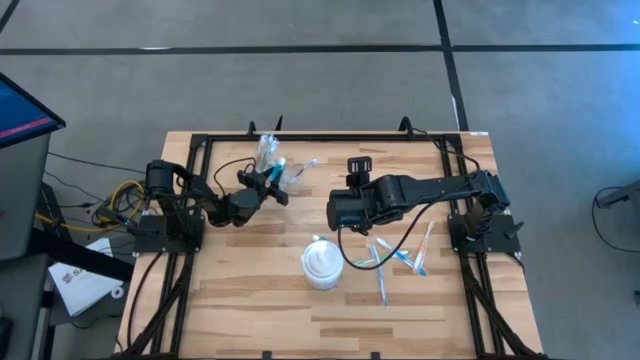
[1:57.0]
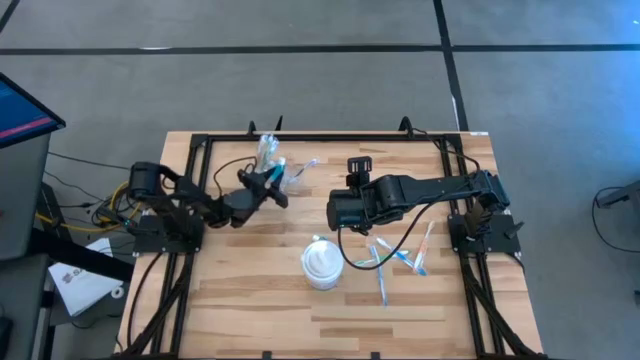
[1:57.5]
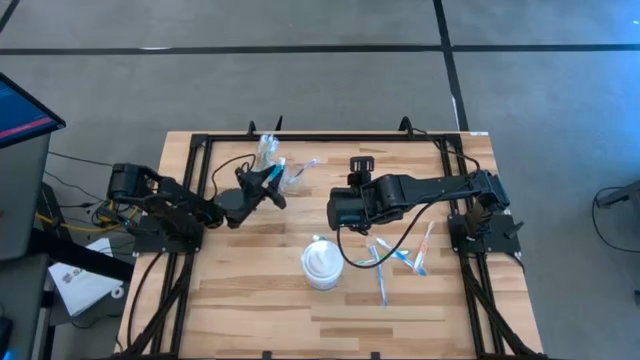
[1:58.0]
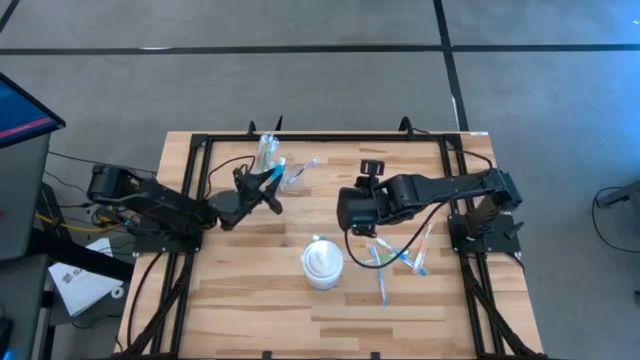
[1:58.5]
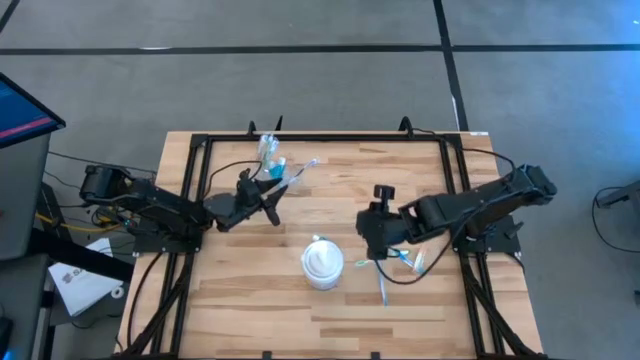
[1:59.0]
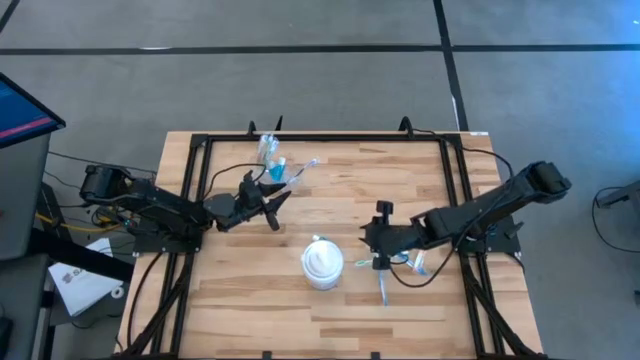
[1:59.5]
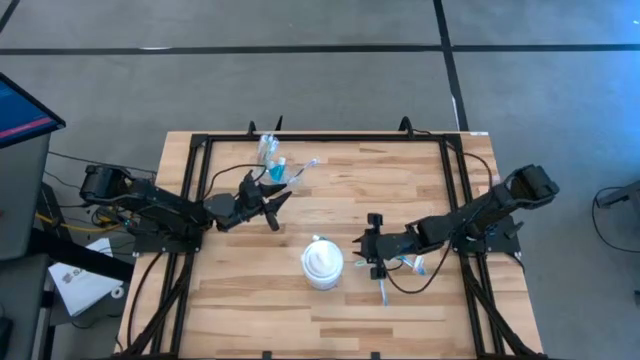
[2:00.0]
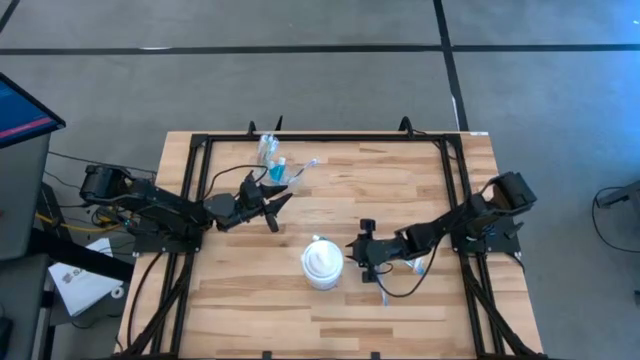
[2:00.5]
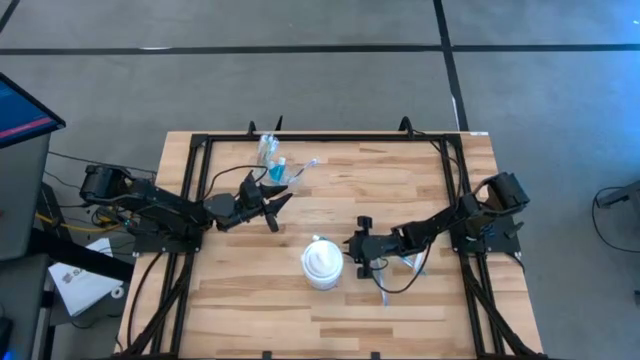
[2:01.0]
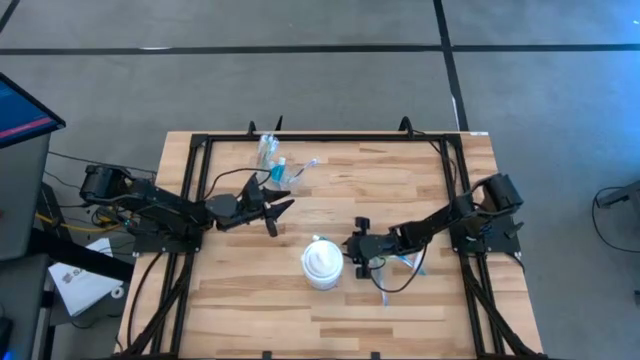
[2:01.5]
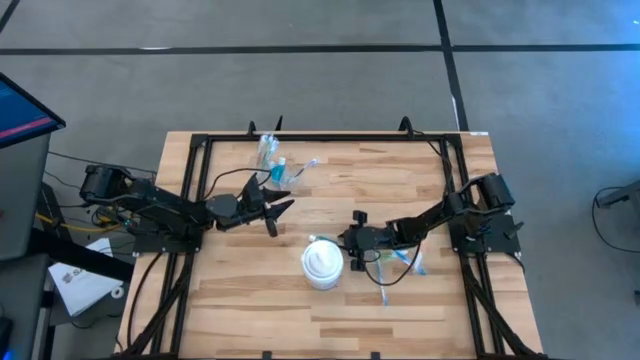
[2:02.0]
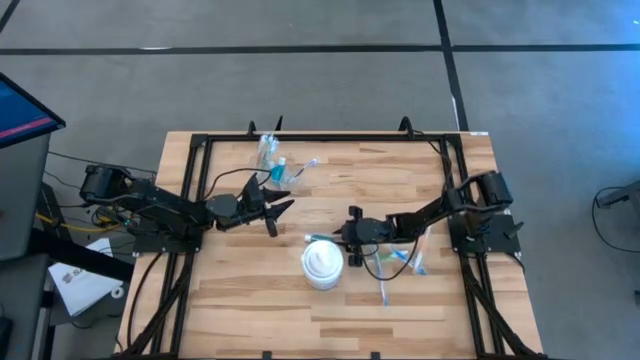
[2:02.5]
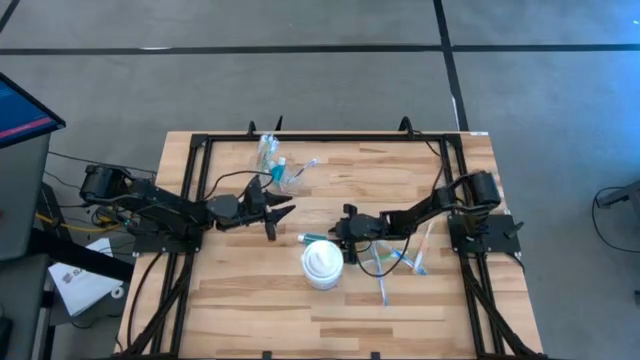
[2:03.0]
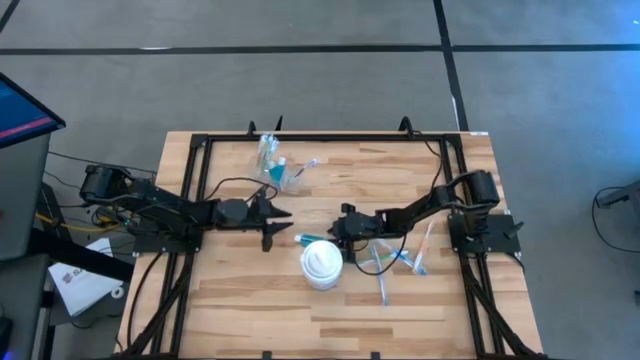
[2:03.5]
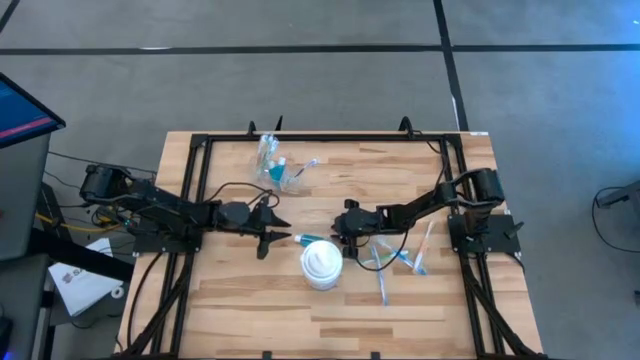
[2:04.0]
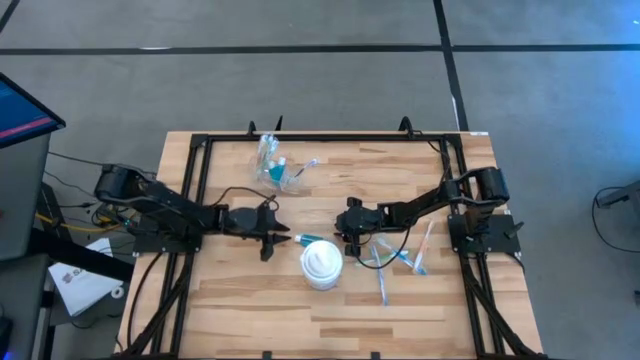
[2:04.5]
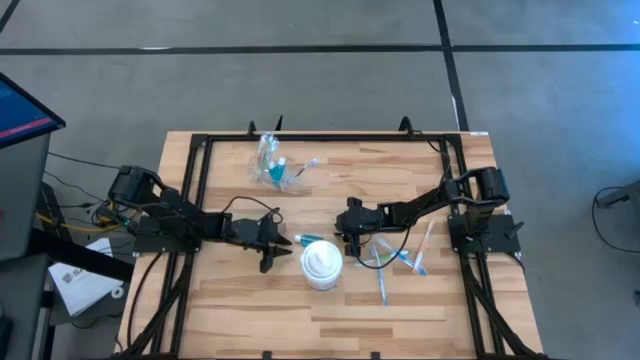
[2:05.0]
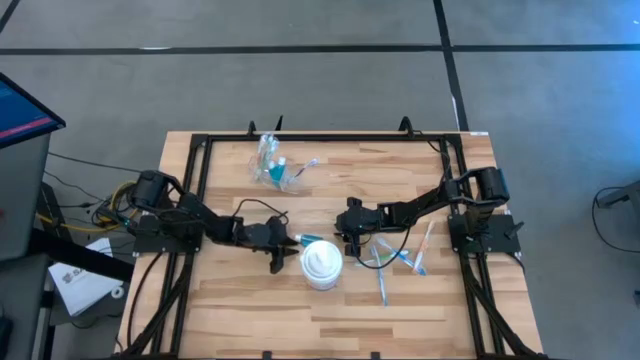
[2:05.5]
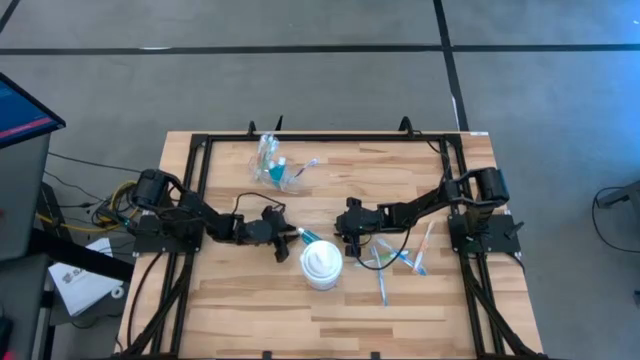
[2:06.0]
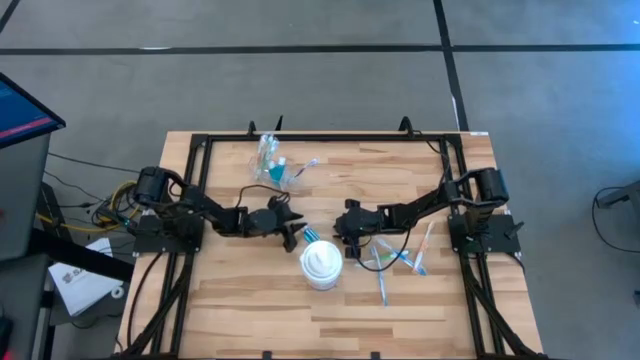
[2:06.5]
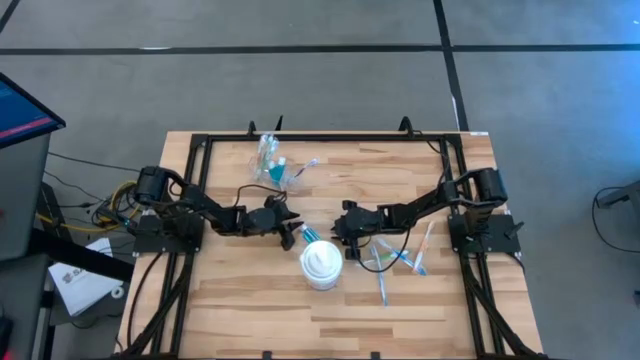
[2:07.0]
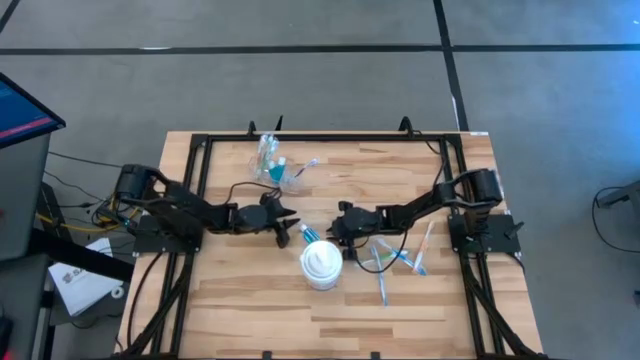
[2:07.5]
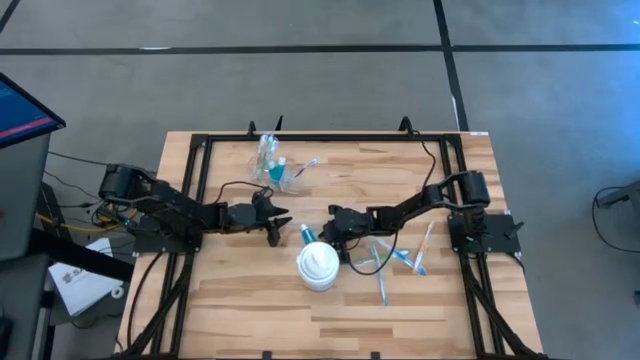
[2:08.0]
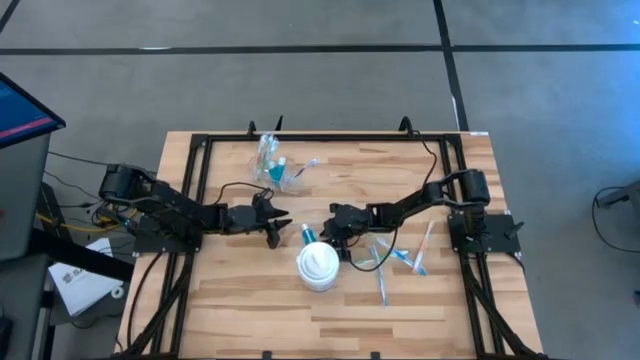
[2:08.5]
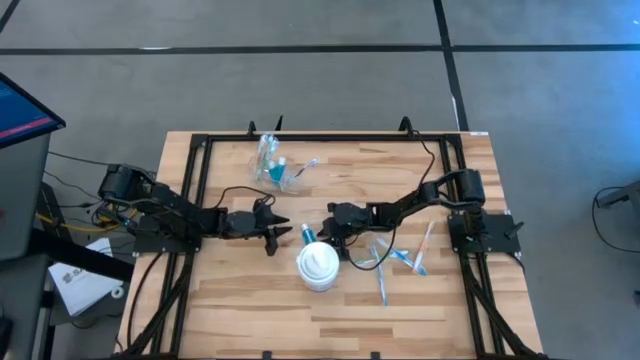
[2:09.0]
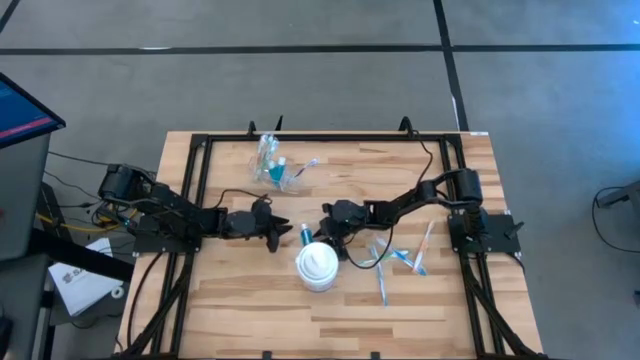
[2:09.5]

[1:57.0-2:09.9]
Task: Pick & Place toothbrushing station
Put the blue mouthwash into the transparent organizer

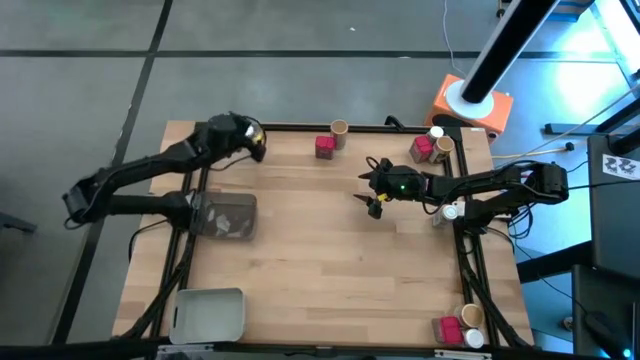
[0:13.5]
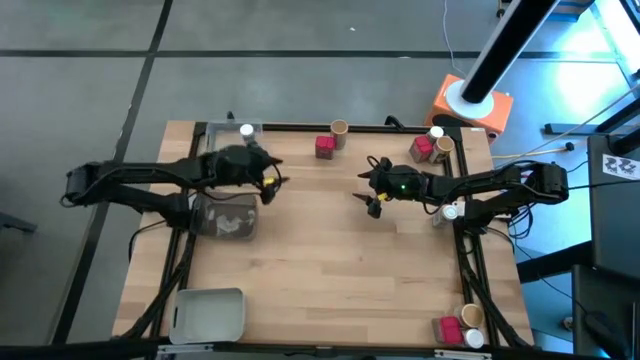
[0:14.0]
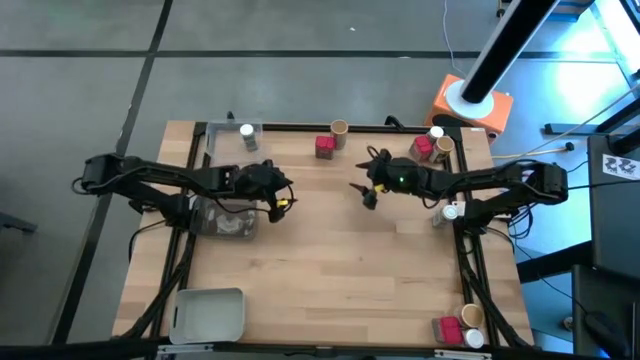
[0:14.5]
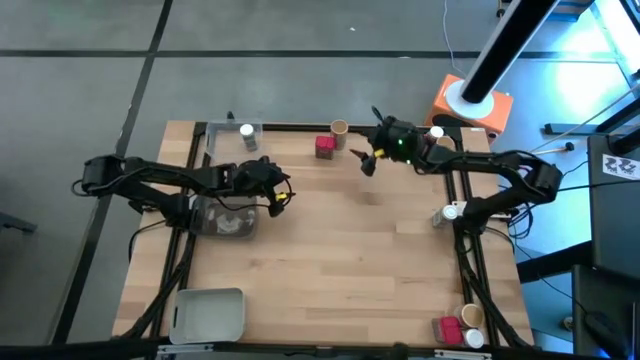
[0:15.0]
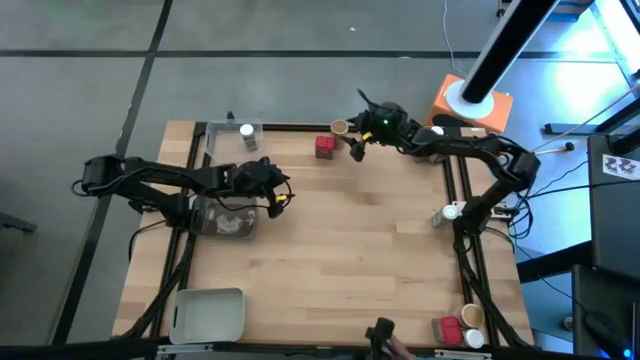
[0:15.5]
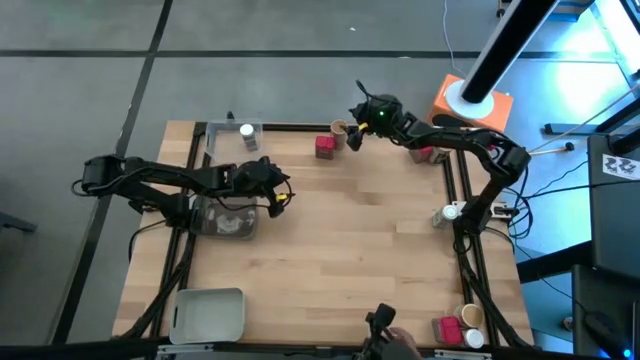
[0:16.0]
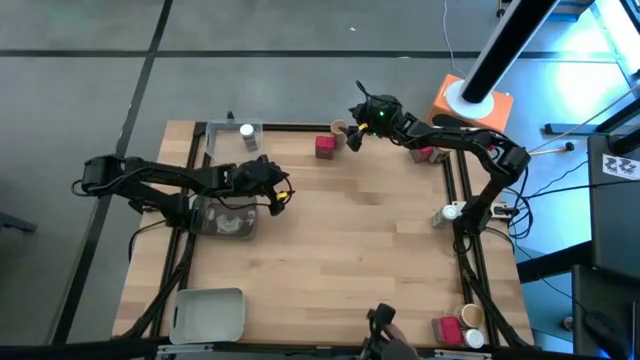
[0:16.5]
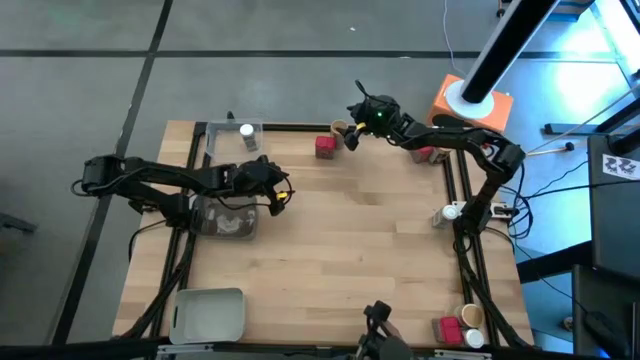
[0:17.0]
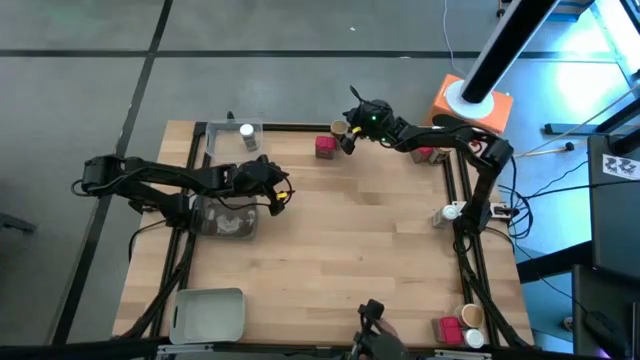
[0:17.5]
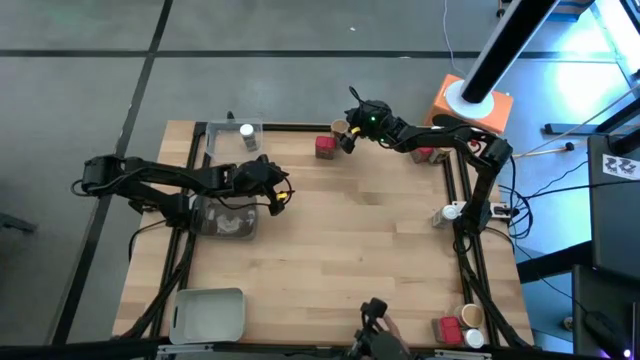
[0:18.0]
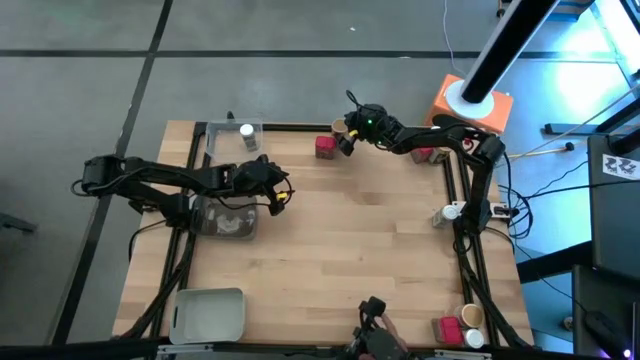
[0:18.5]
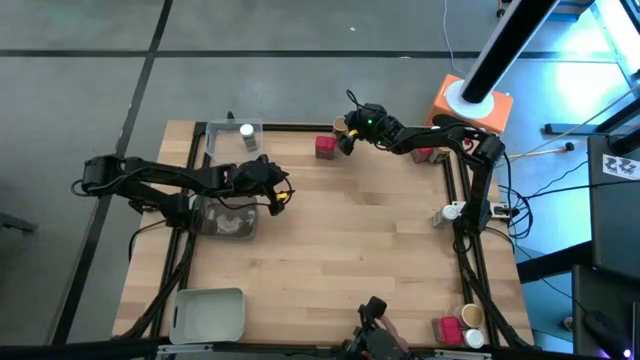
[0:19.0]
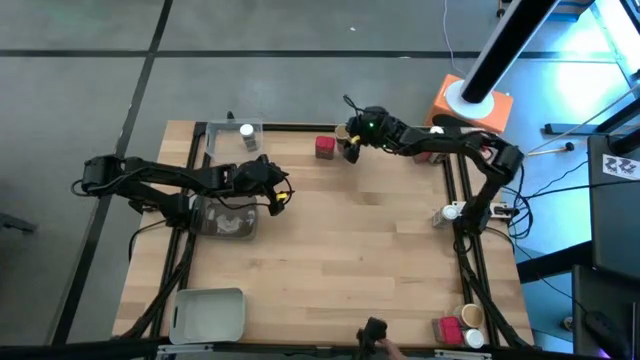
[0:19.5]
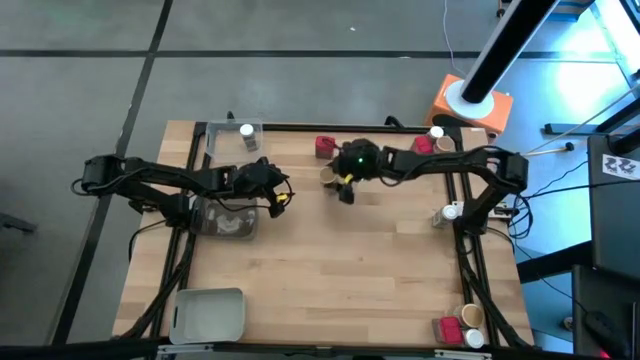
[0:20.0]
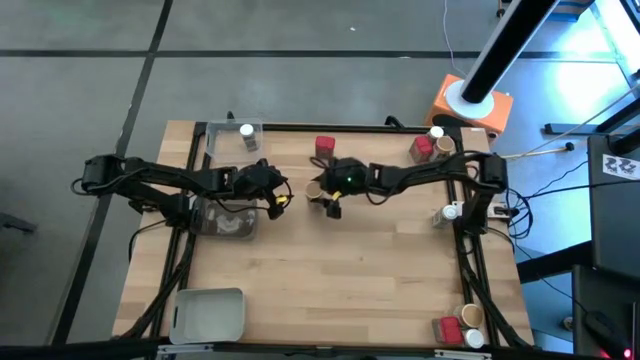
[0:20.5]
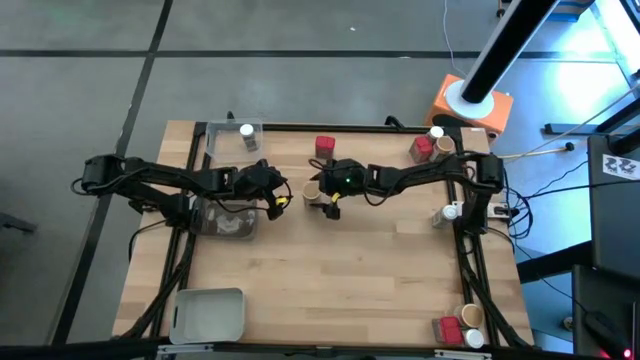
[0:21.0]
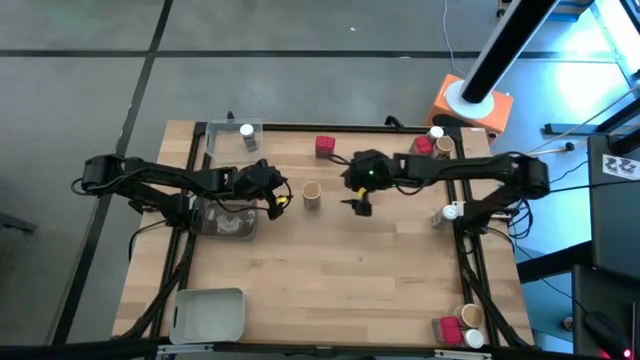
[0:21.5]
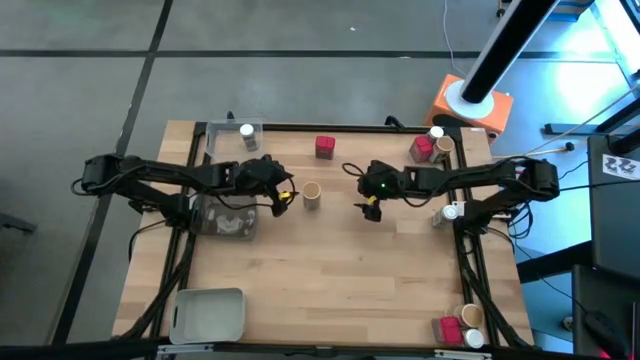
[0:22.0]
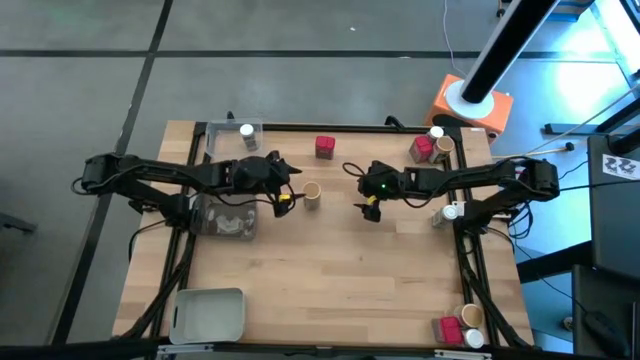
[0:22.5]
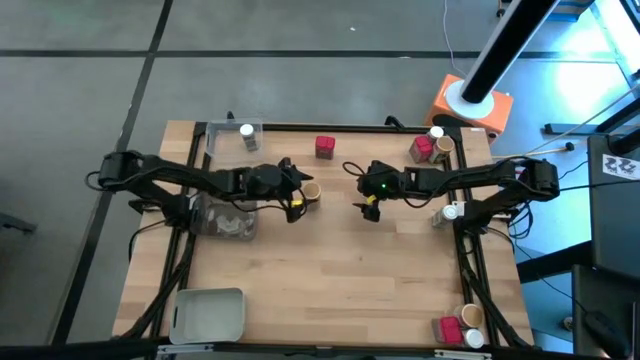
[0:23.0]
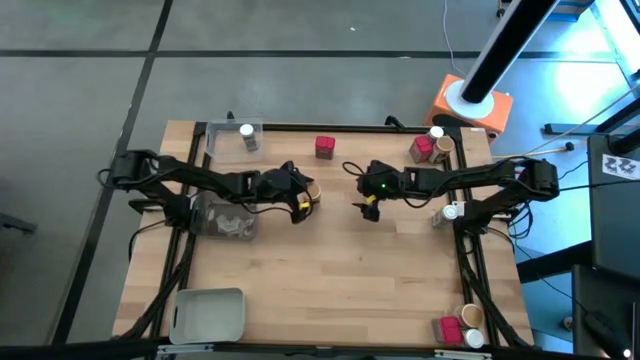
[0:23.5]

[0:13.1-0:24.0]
Task: Sort spices by type
Put the top left brown spice bottle into the black bin
